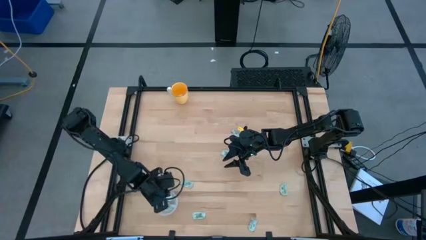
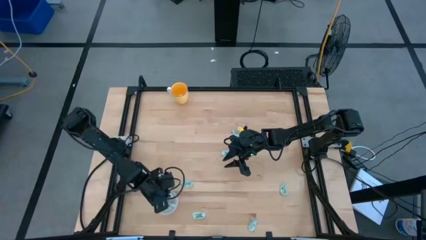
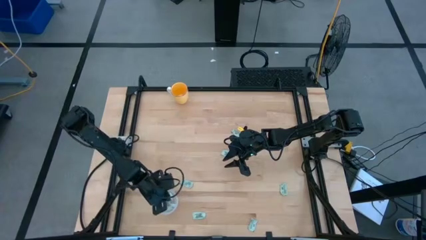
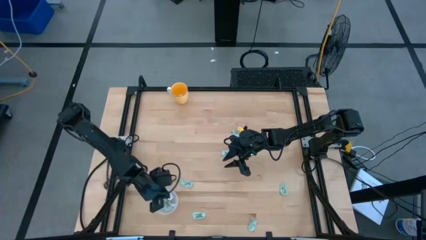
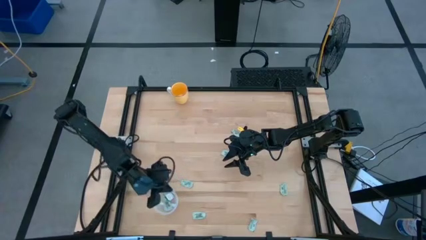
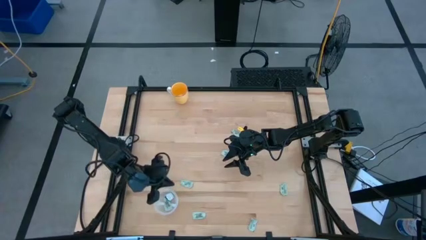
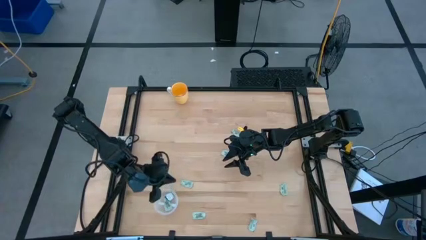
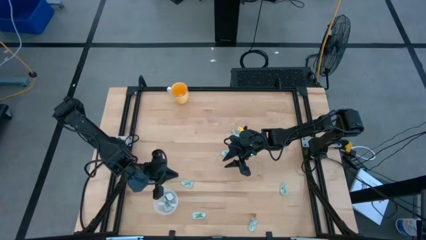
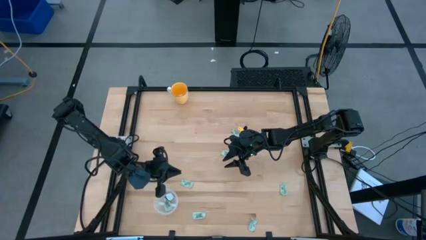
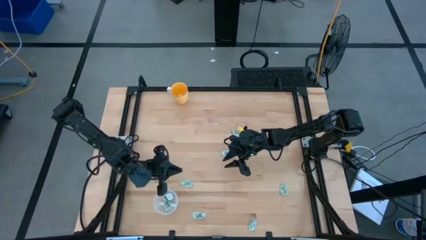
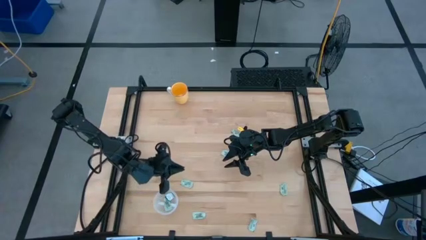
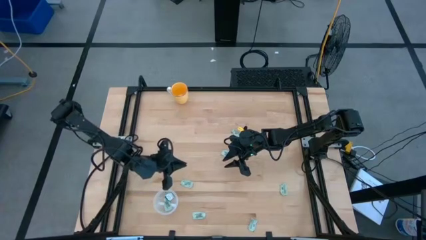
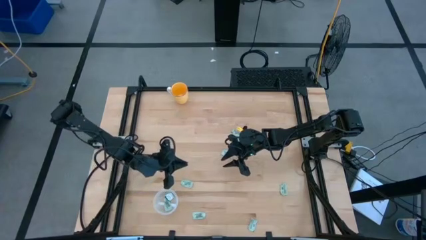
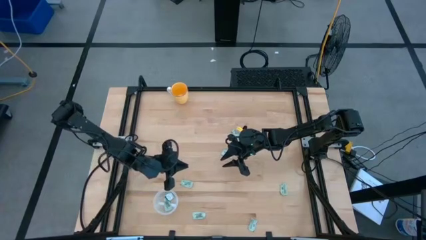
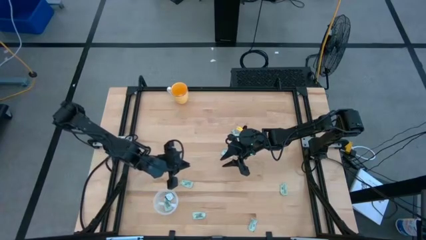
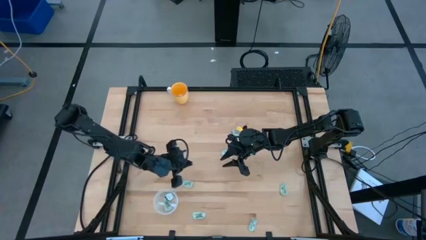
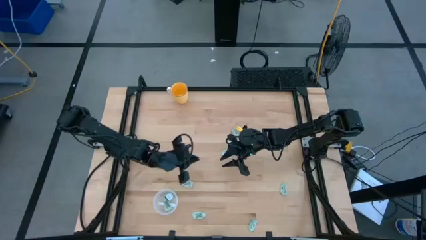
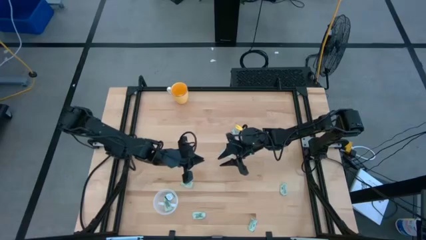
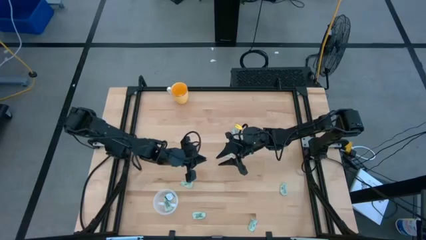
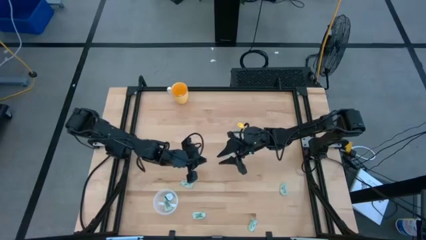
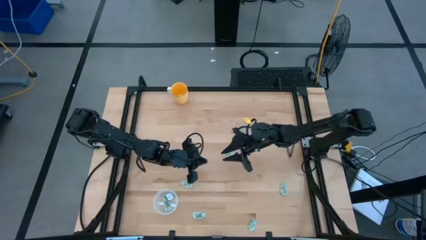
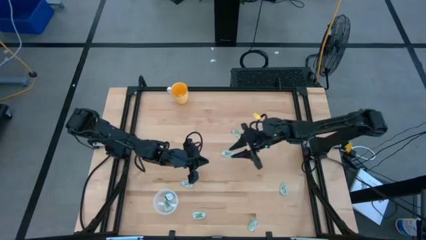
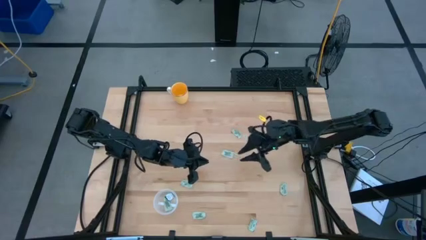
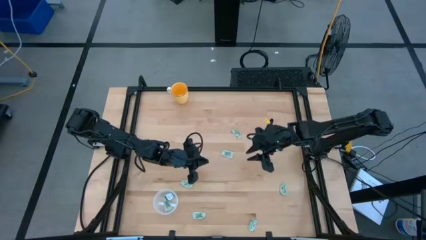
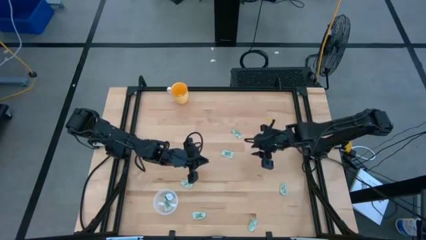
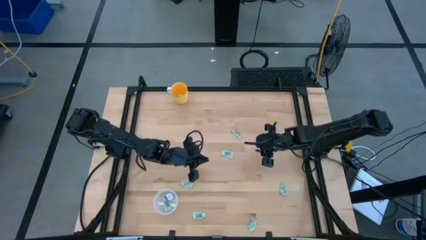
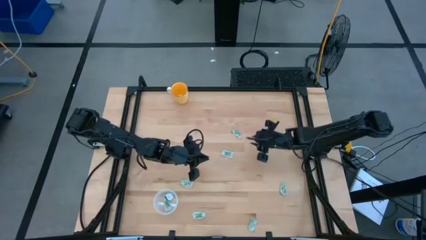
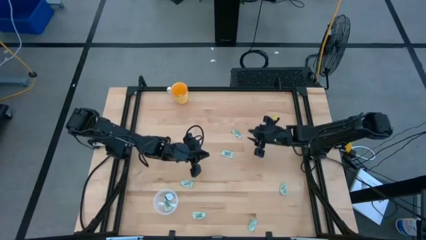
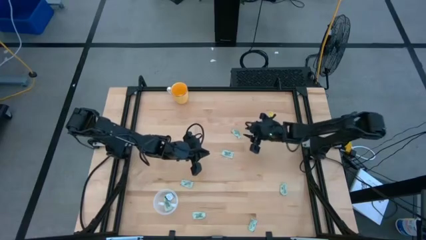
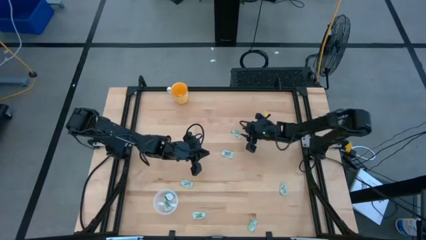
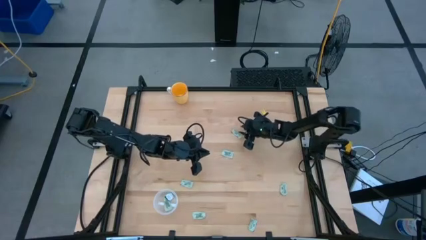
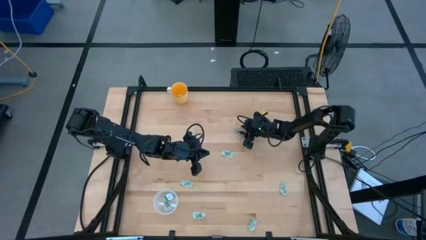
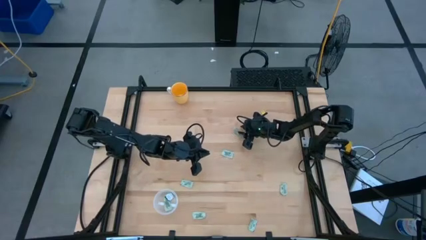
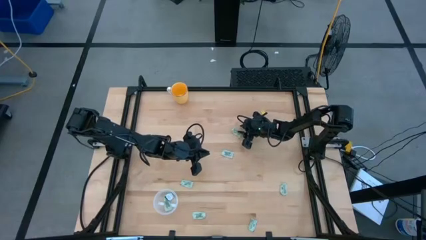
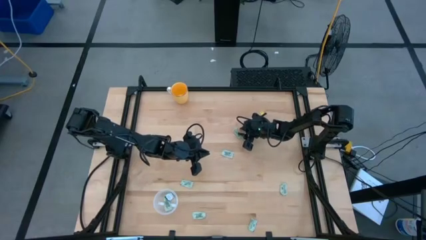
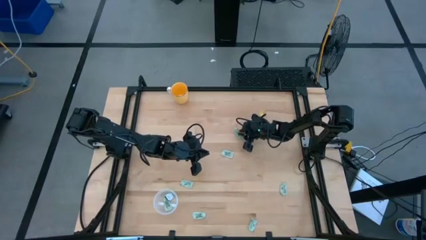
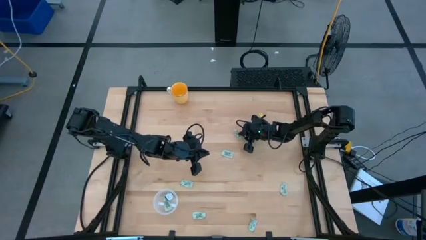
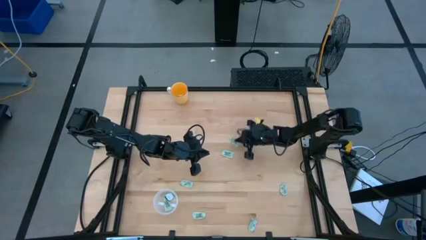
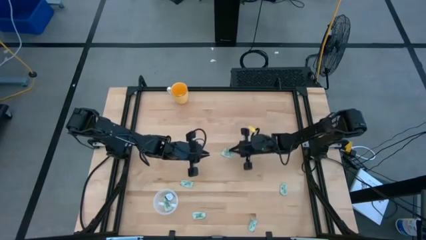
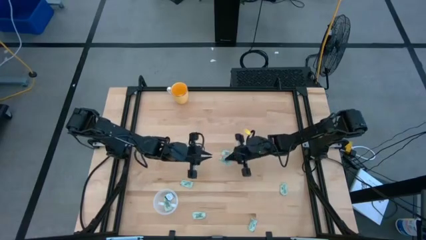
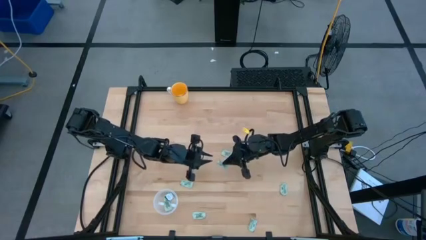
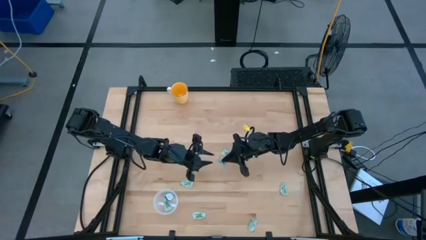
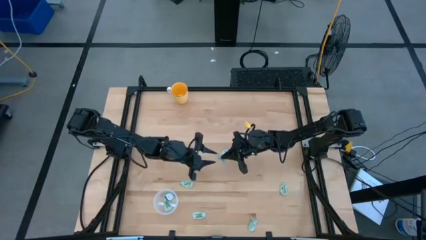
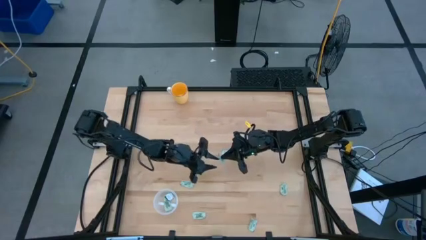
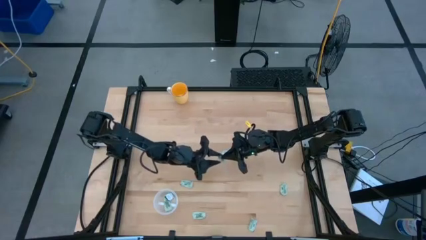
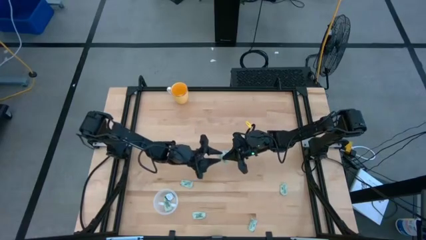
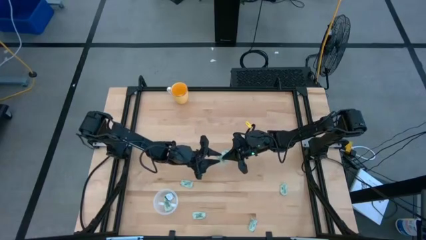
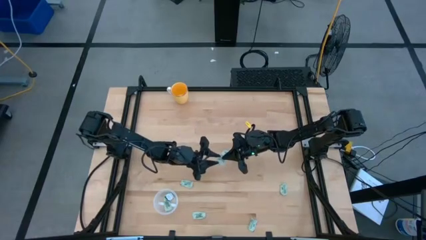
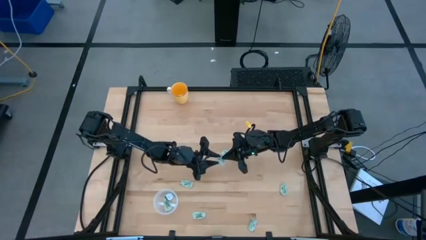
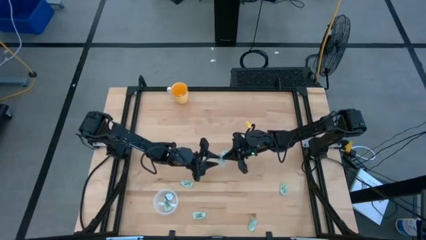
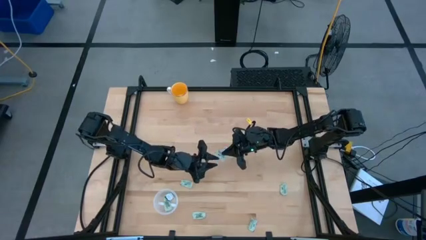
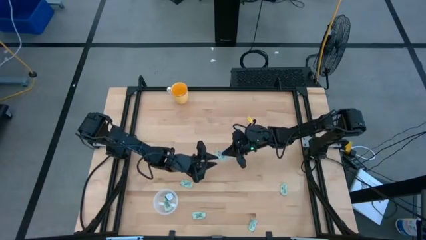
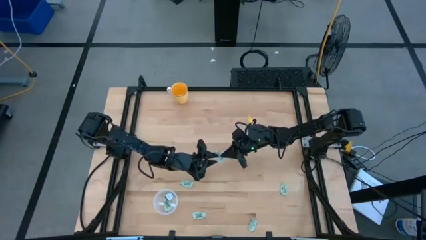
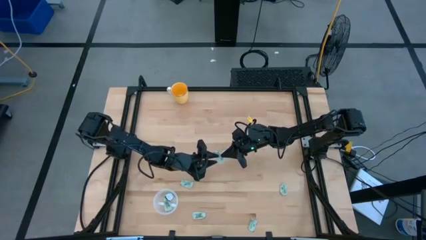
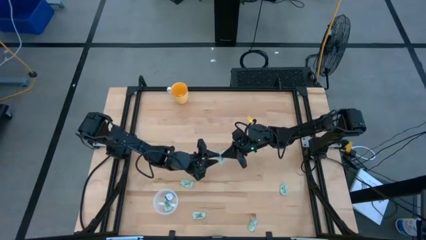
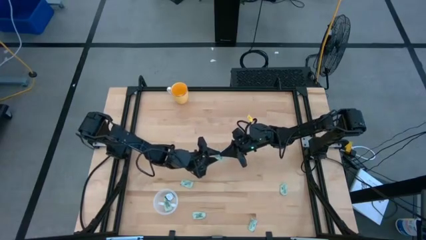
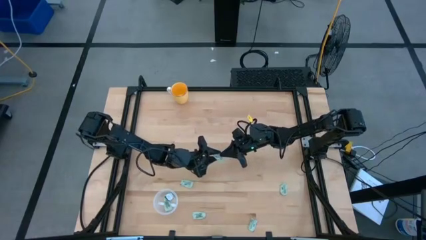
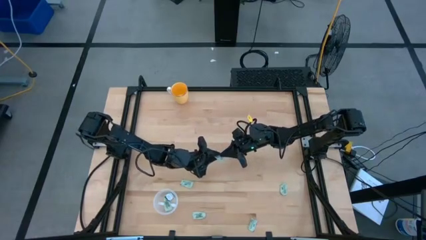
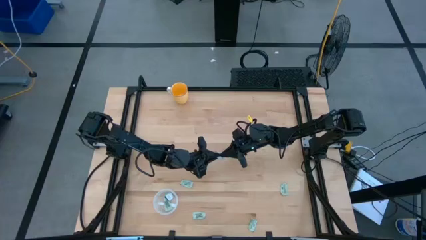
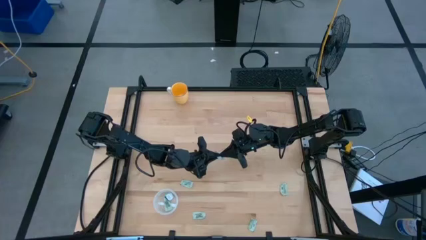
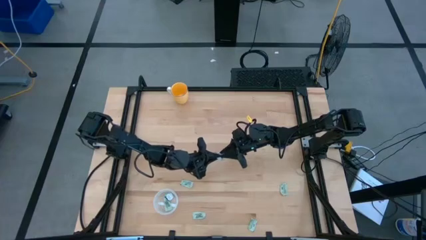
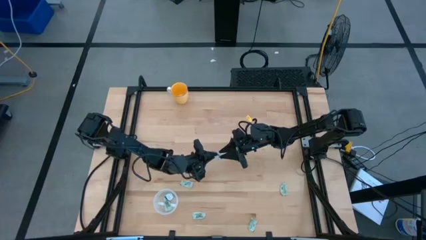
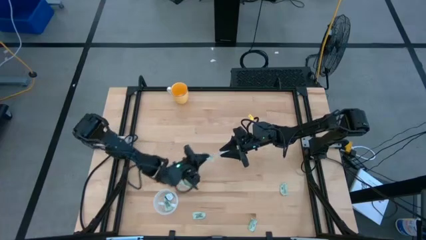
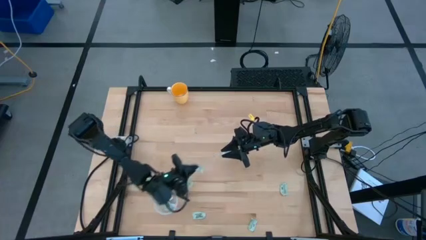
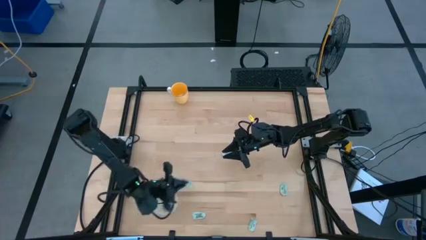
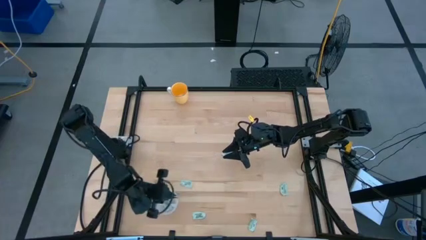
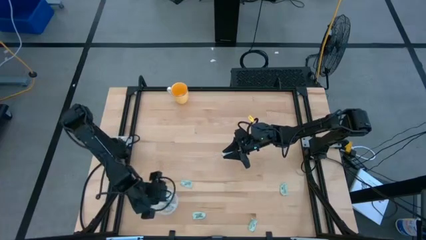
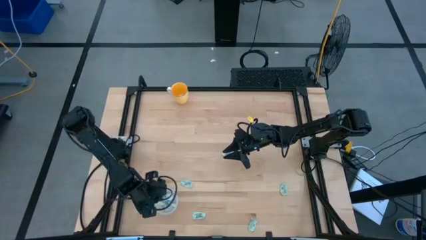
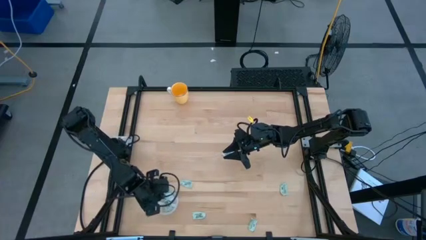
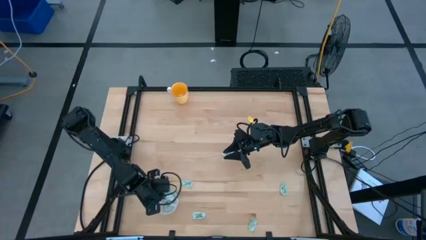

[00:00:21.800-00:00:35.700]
Task: Pick and place Stevia / Truvia into bins
Put the stevia packet into the transparent container
